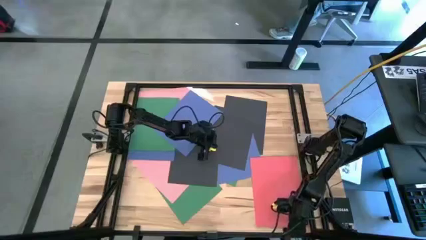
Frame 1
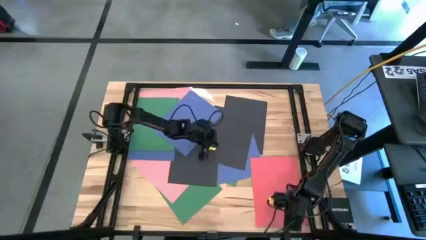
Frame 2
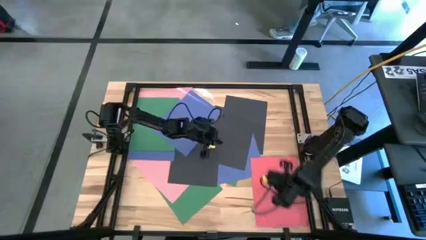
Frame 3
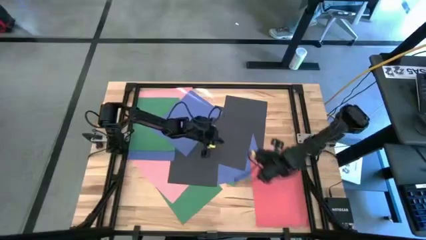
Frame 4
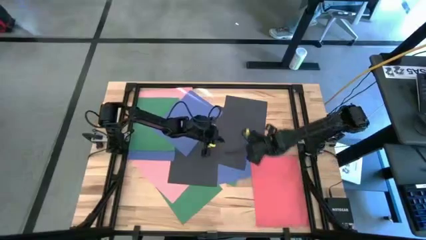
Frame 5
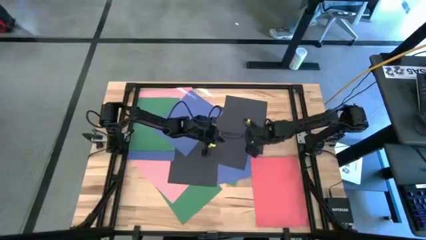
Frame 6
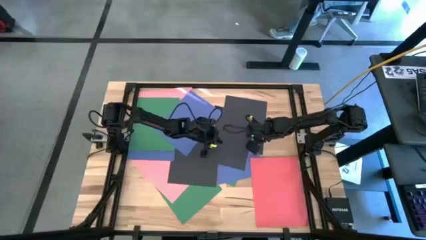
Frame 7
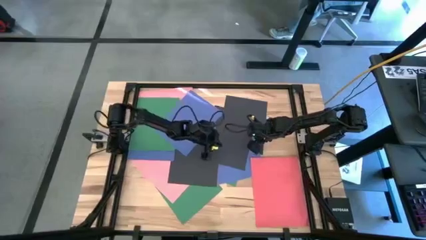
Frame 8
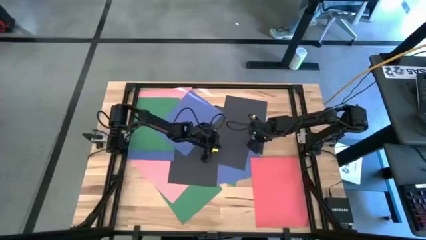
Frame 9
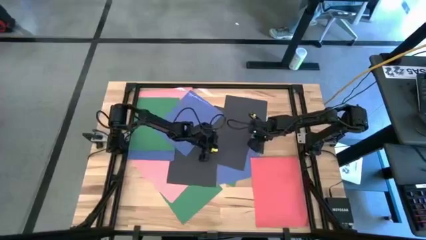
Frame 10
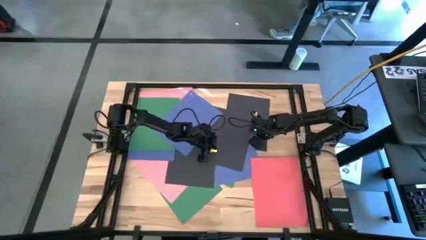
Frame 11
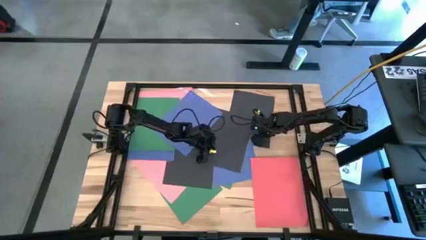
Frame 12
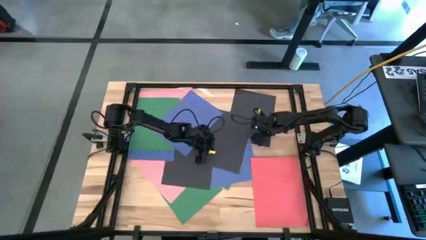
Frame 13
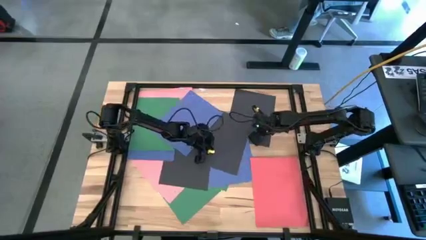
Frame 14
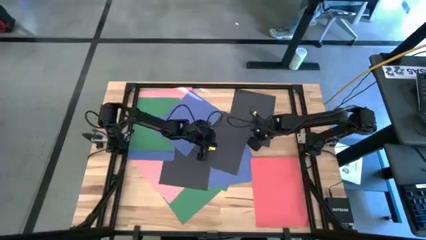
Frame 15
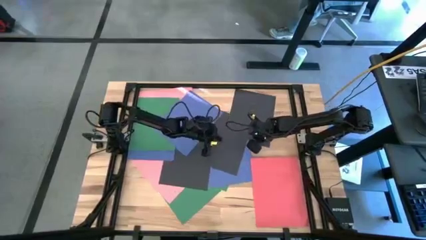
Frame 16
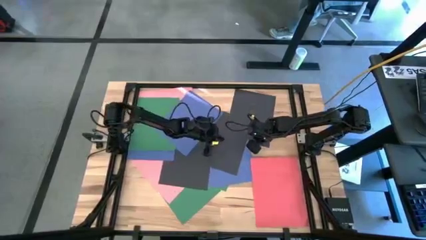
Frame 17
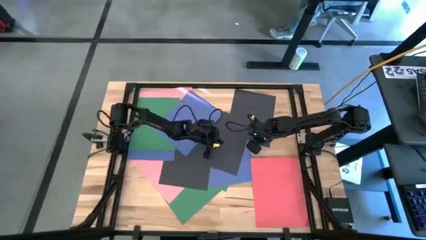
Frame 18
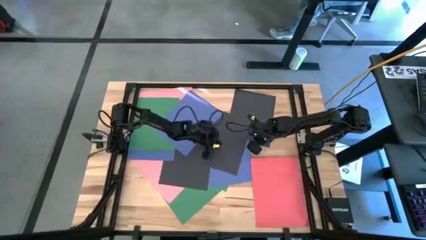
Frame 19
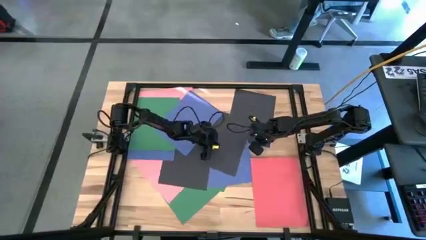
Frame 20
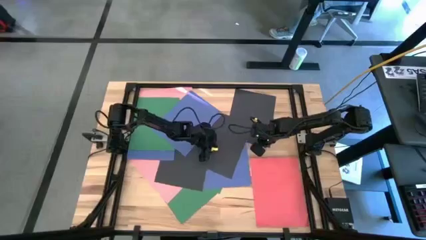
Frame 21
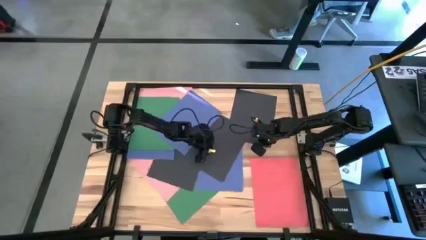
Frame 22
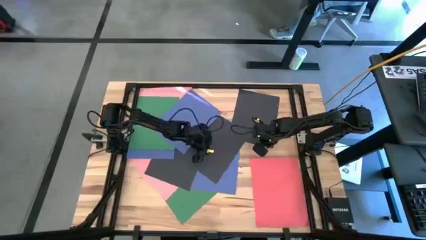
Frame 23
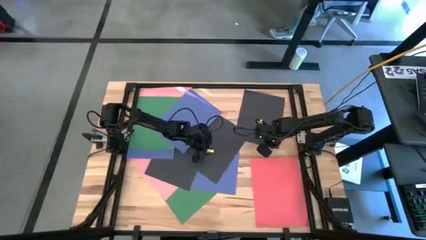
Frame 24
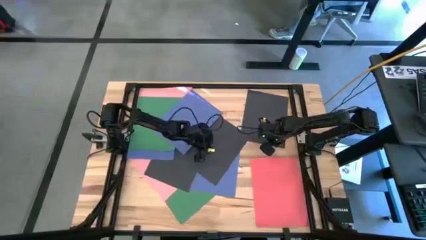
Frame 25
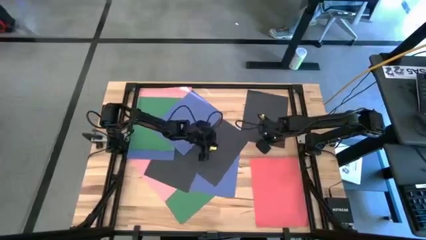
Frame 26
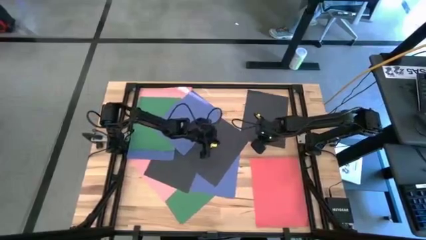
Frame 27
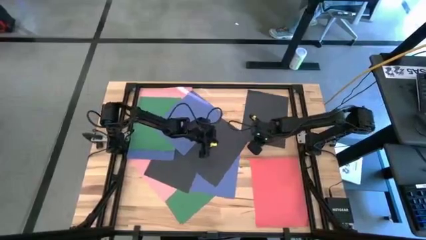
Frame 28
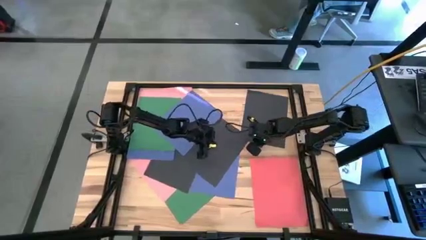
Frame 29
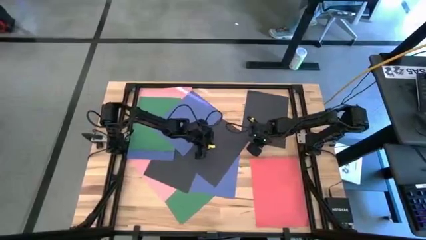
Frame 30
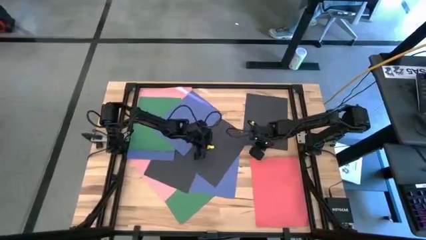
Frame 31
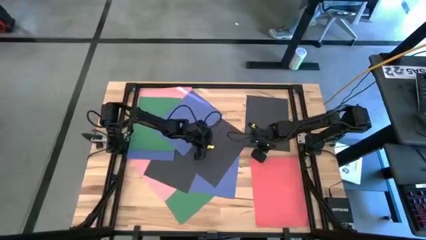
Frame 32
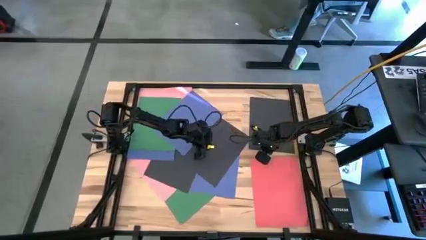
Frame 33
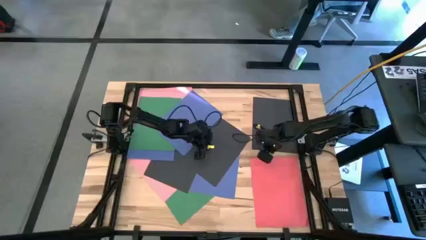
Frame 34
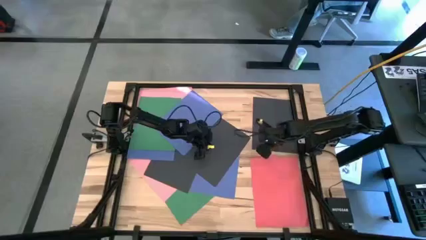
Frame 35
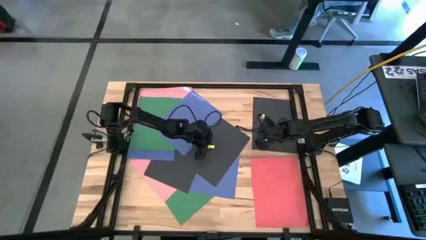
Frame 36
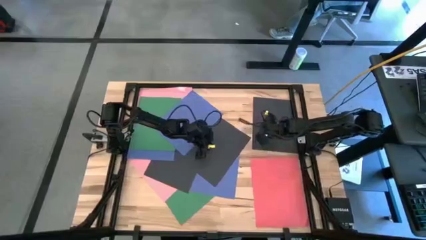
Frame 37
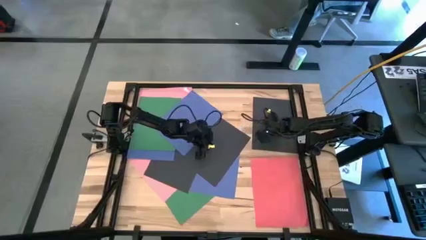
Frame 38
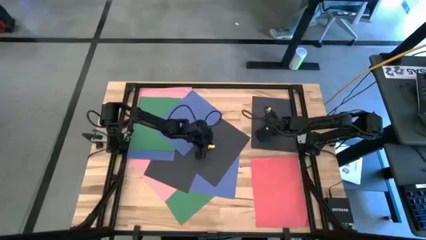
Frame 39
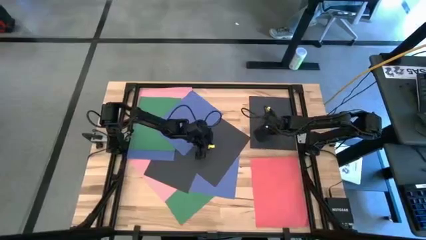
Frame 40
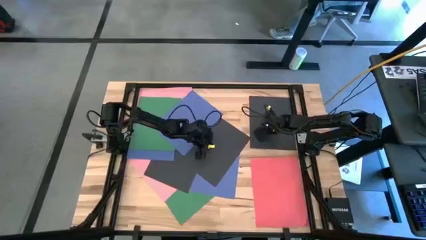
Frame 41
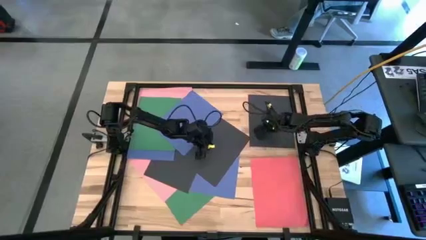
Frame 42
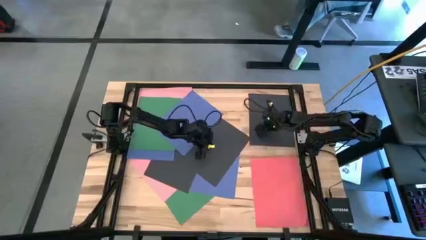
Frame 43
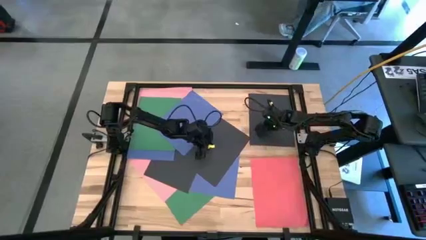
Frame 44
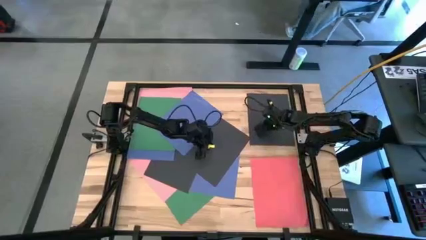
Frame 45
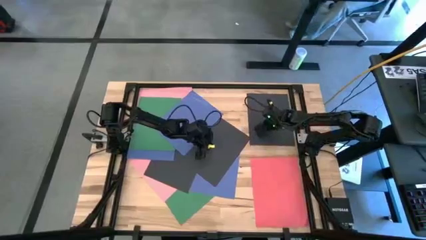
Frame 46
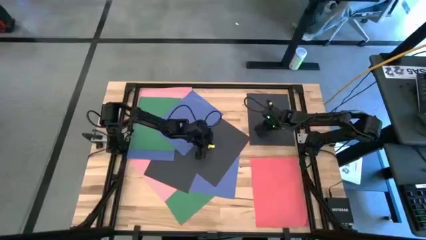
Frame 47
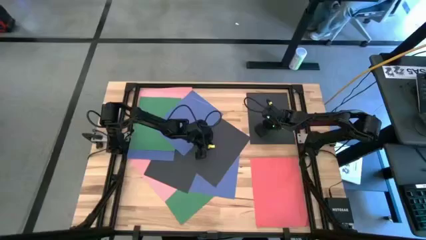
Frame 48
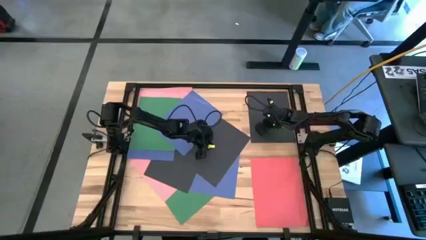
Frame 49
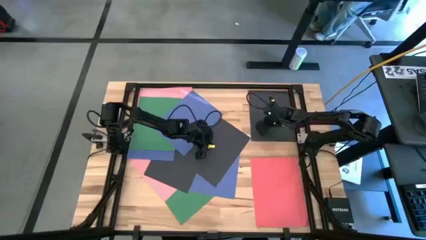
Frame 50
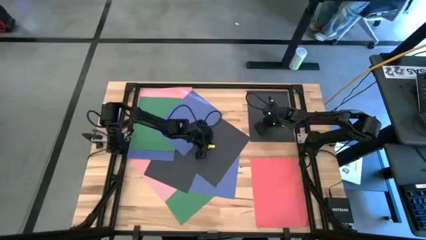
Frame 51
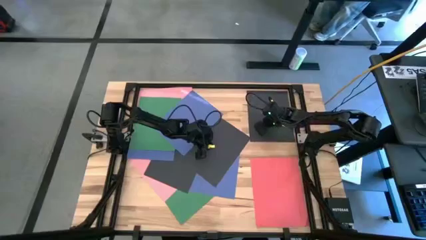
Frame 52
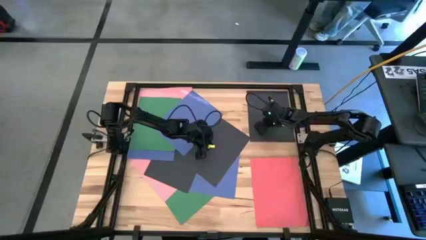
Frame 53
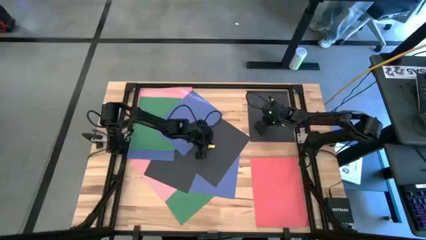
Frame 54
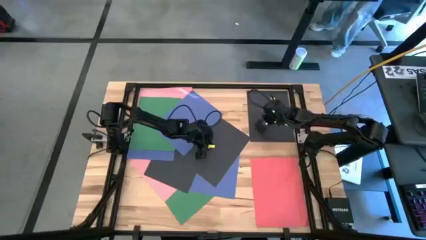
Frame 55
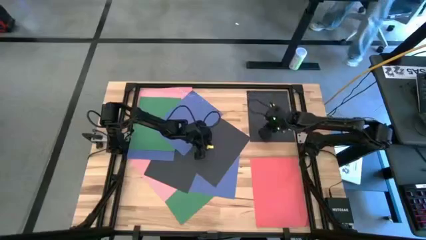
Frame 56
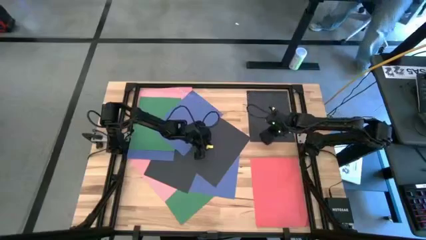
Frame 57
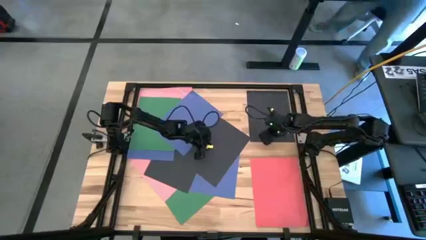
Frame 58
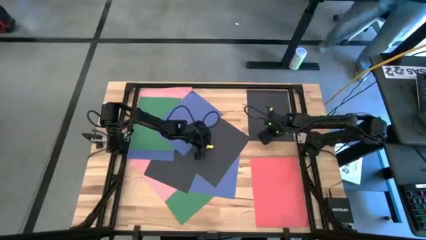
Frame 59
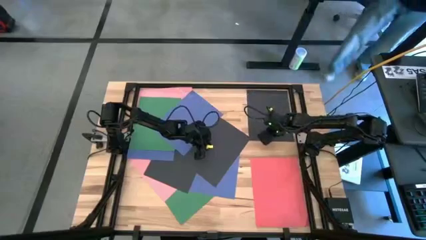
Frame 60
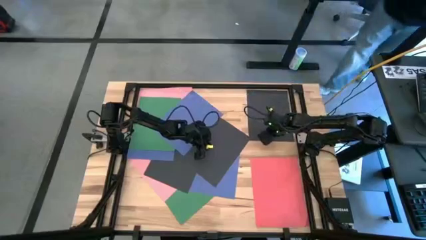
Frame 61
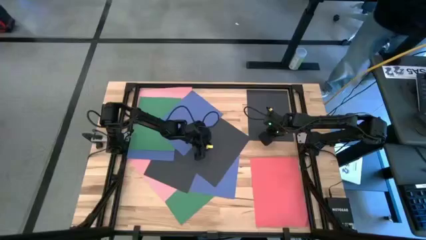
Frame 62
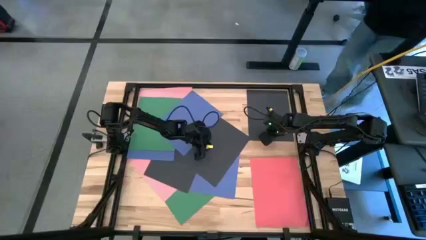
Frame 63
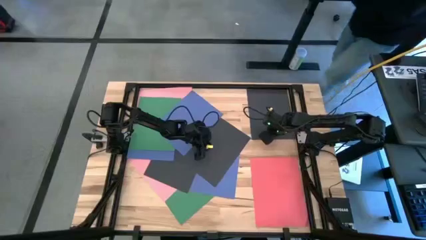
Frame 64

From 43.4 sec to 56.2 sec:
Task: Organize paper
Move the black paper to the top right of the table

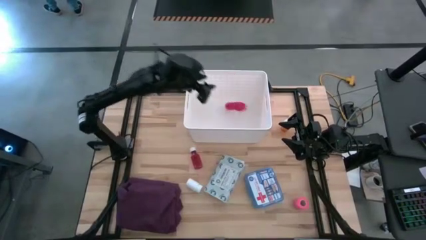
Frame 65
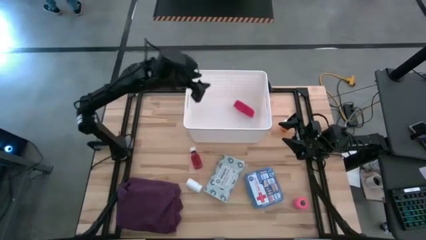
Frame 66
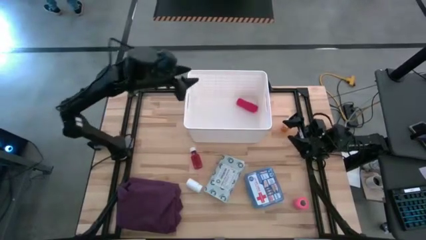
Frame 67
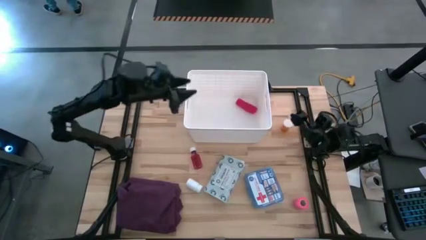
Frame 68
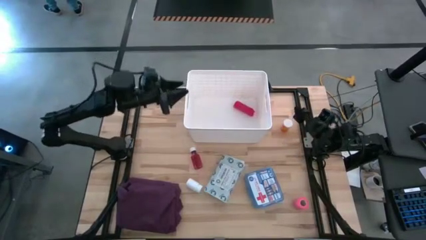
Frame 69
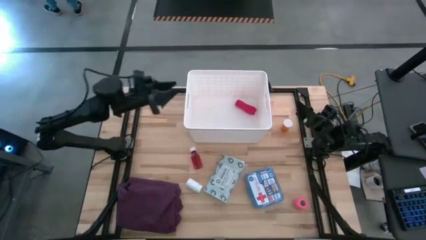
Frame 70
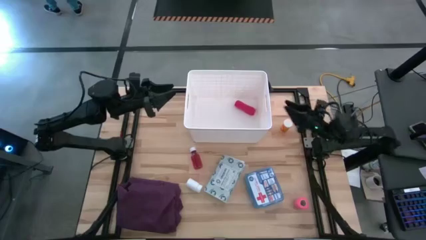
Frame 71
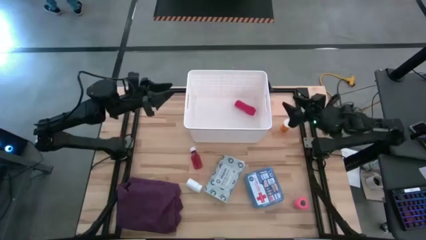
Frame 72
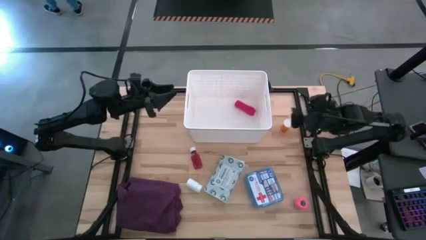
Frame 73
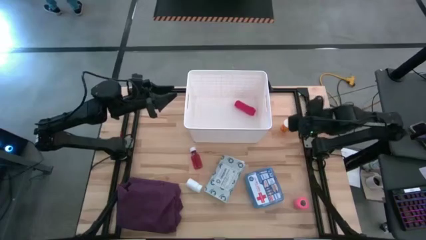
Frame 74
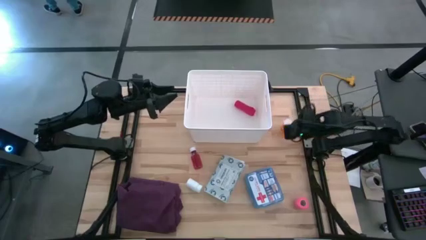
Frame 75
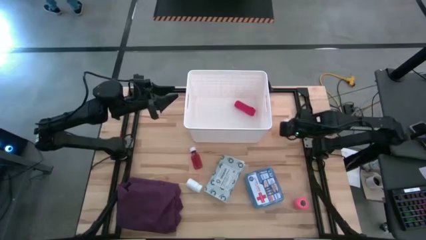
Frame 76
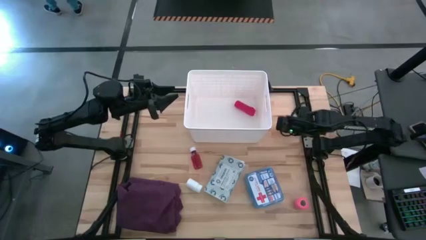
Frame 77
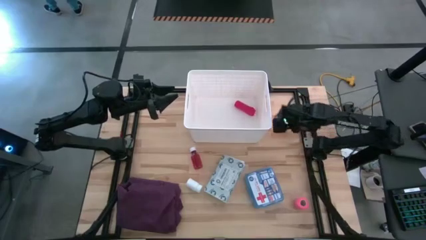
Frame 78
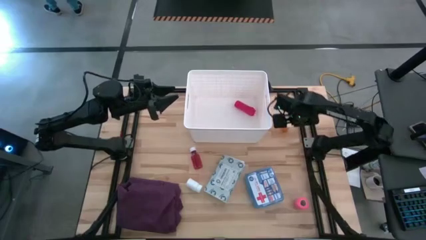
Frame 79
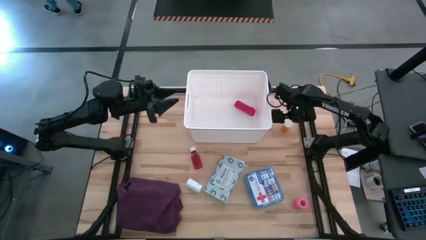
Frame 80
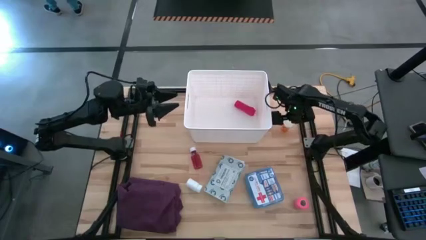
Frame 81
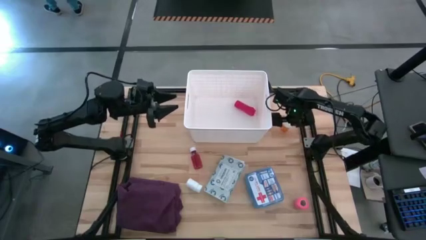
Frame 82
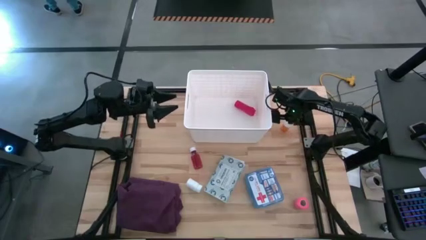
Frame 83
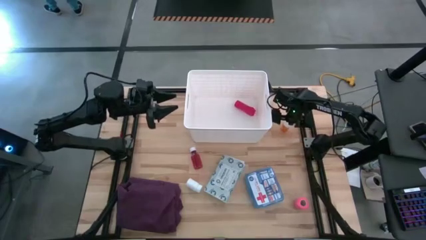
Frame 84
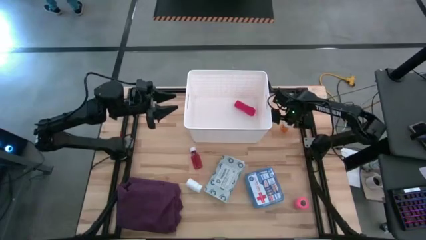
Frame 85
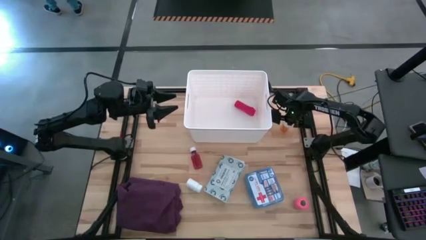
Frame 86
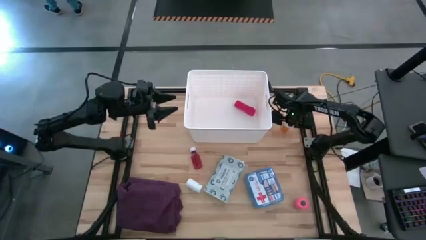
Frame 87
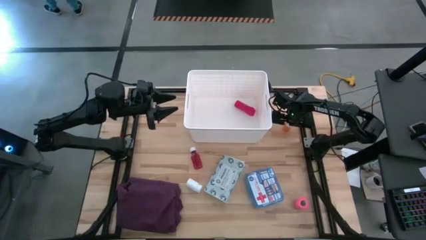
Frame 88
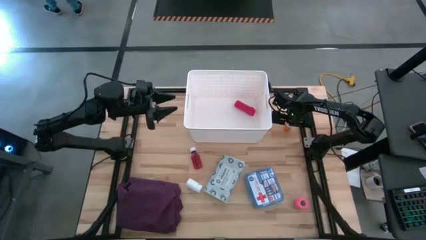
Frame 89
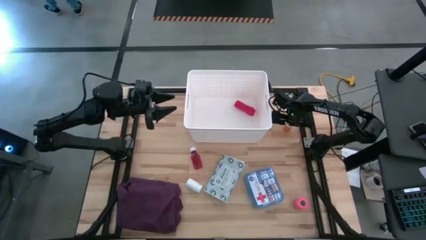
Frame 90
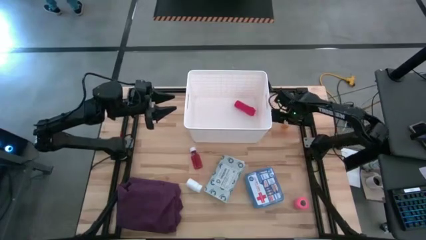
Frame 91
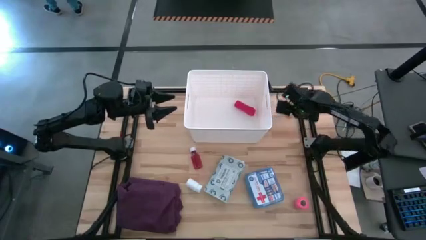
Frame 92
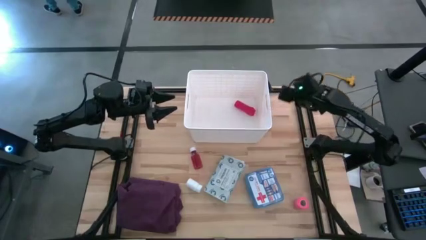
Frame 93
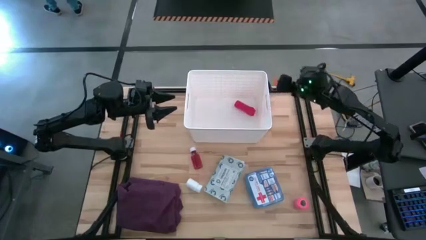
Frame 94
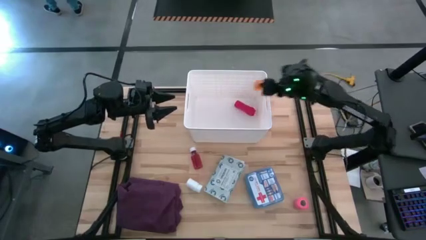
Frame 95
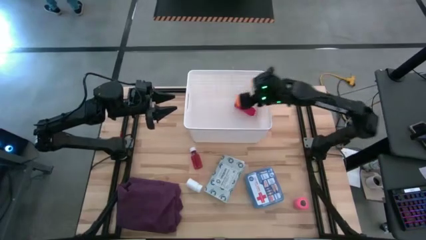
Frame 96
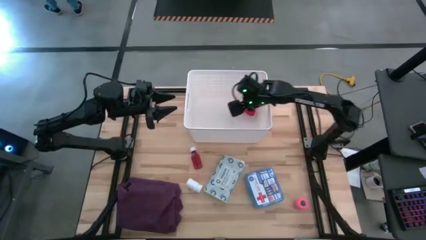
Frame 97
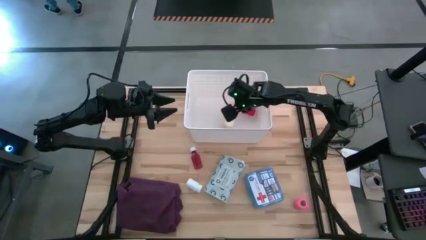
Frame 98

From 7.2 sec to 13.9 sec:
Task: Pick & place medical supplies in basket/bin
Put the orange pill bottle into the white bin
